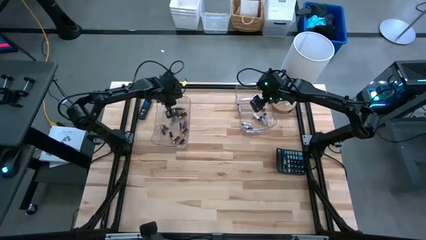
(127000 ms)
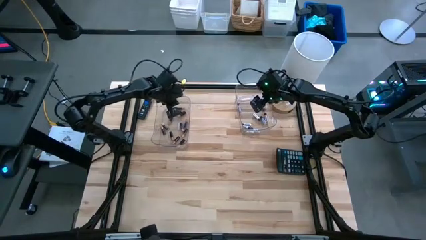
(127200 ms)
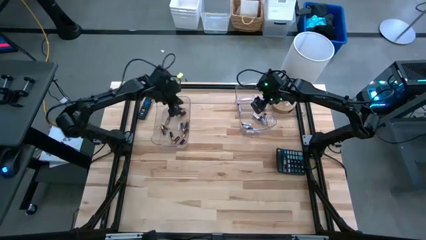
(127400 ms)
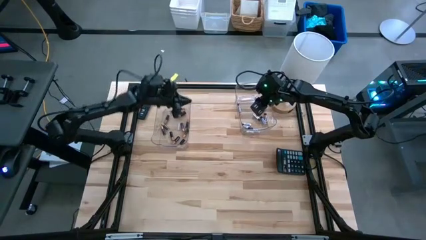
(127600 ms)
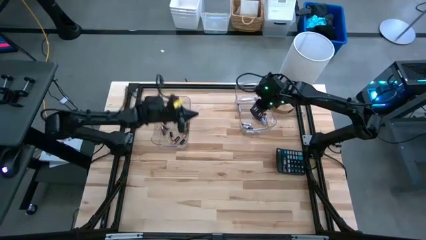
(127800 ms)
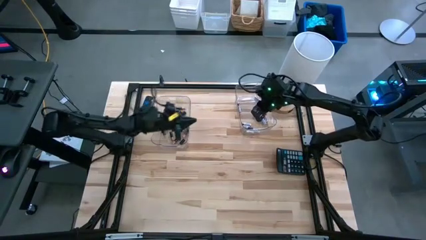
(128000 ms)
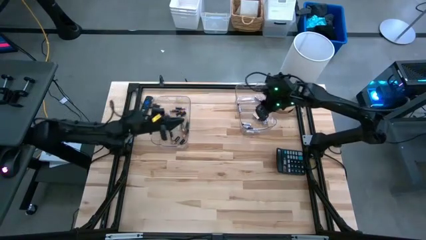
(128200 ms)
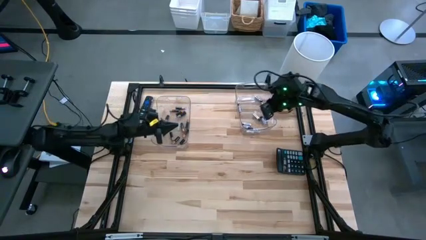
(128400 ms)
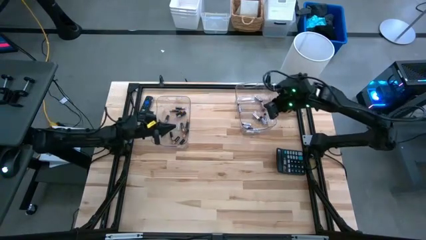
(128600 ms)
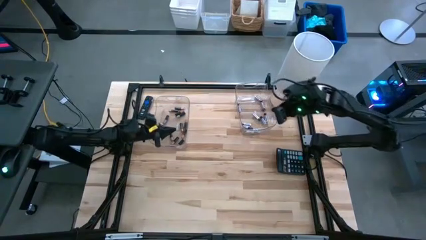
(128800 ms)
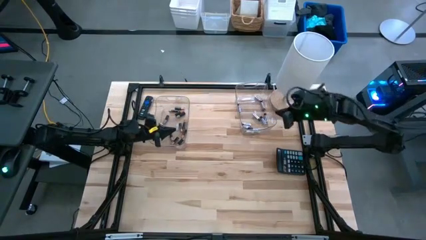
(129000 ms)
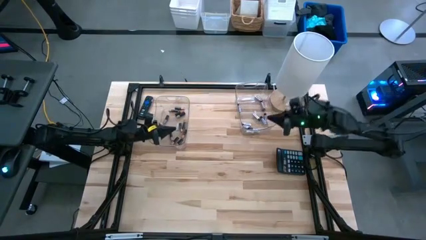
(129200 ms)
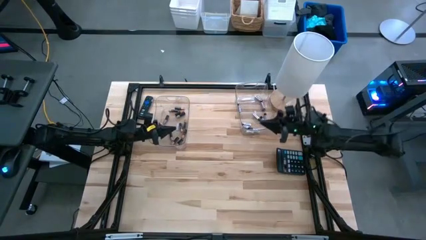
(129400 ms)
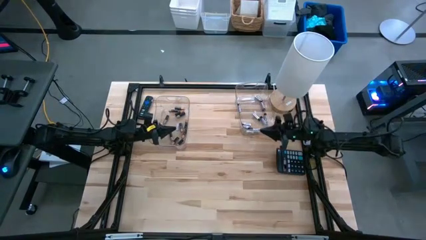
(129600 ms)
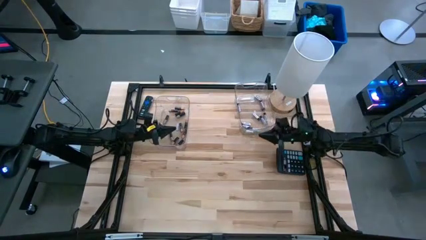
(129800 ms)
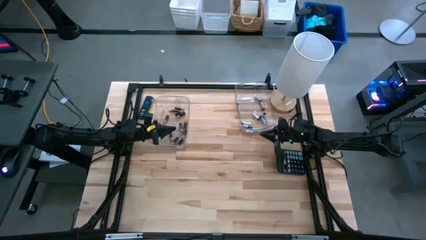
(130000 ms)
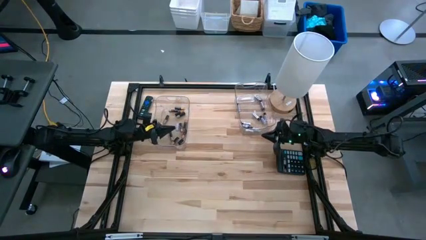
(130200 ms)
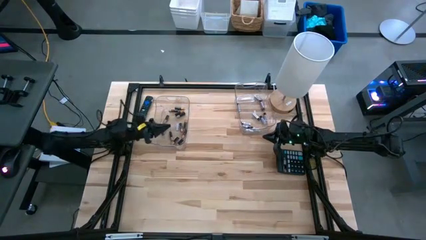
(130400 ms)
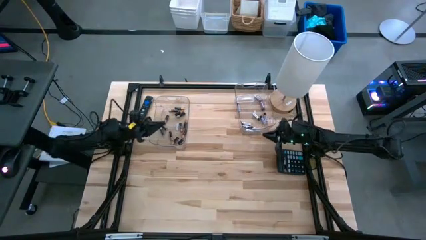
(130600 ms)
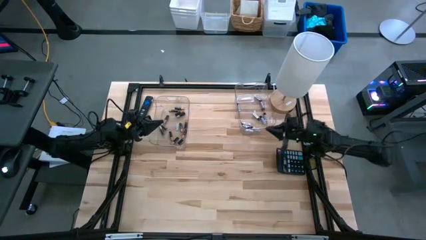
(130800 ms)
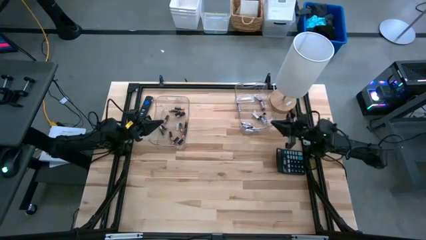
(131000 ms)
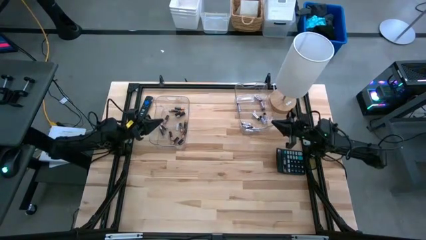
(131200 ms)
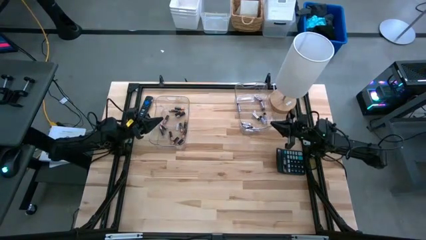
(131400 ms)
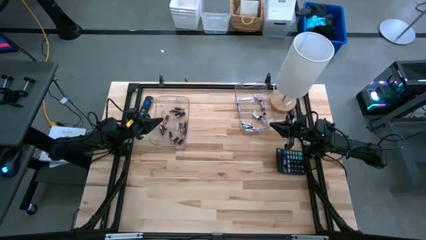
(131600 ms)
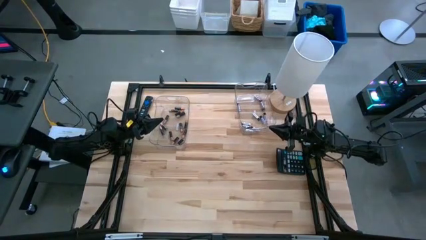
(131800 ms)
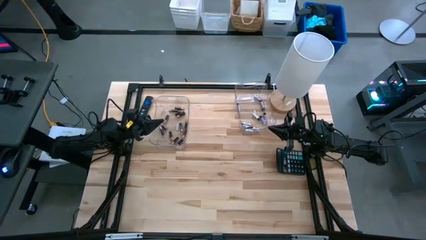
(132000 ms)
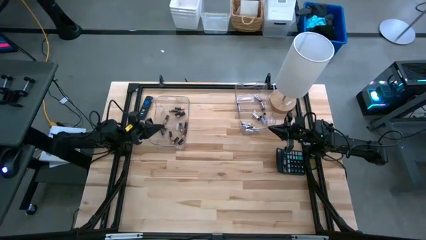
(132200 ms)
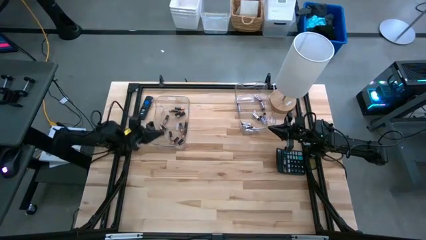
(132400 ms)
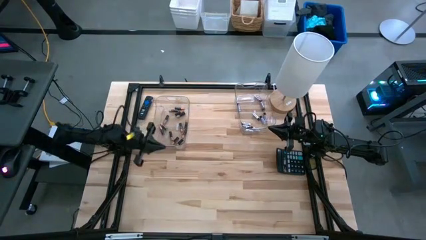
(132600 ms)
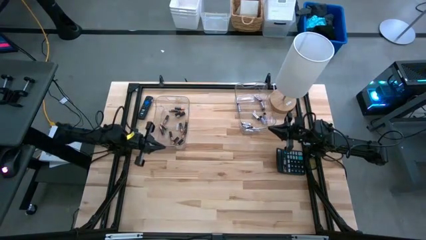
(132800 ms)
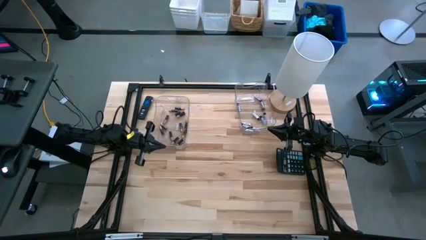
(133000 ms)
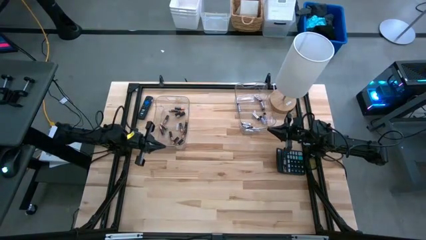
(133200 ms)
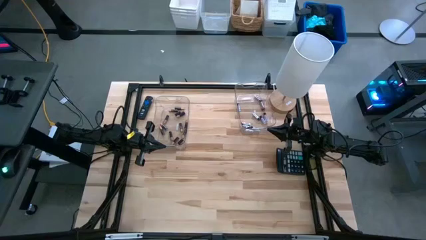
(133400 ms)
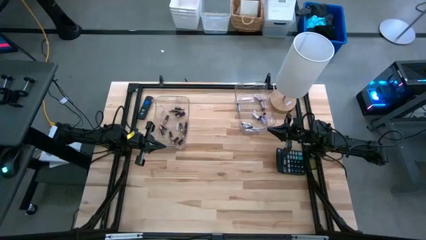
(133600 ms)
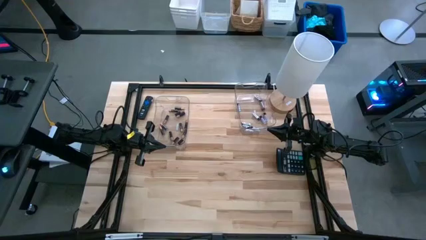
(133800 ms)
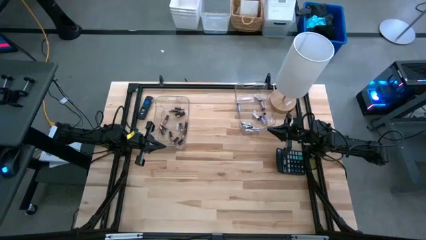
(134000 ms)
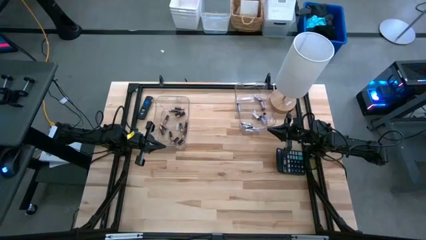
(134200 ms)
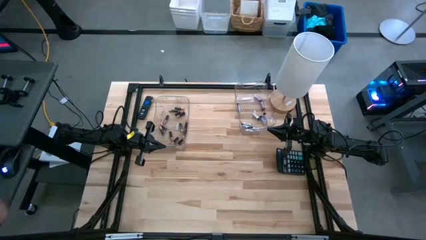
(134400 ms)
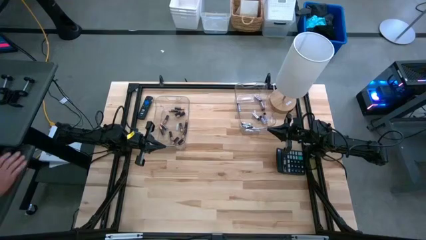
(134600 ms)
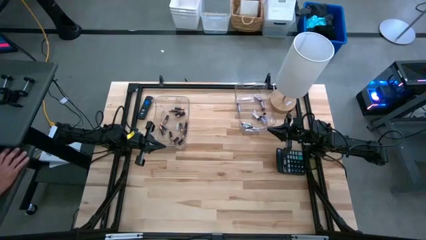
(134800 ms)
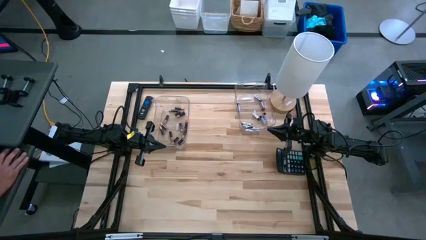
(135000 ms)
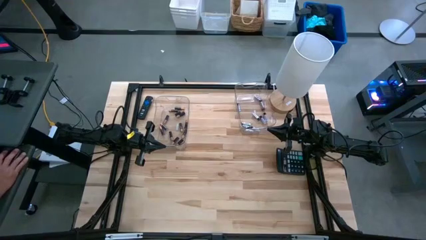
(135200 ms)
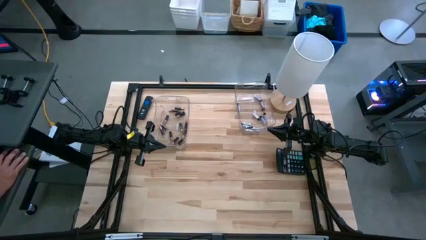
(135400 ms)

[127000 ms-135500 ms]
Task: Sort batteries
Return to Home Position

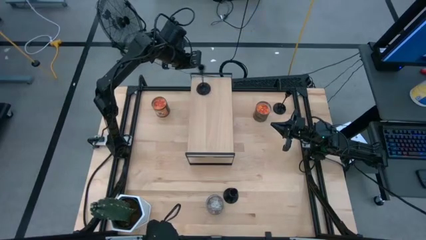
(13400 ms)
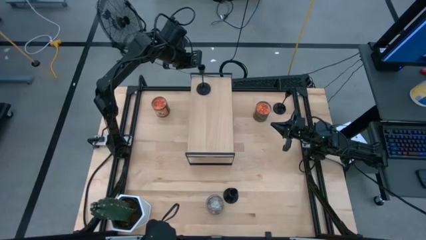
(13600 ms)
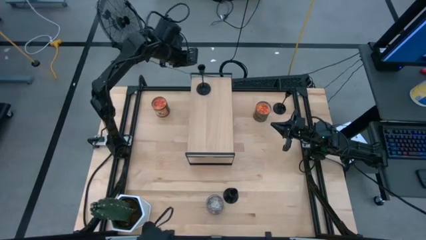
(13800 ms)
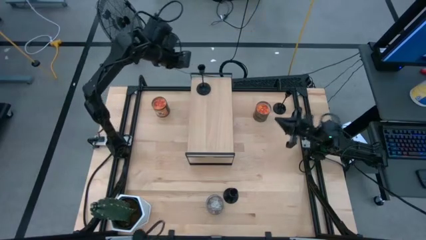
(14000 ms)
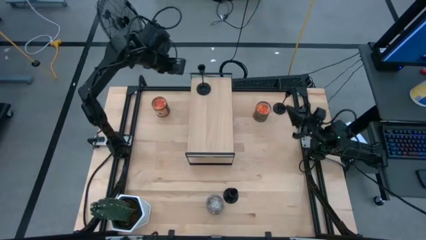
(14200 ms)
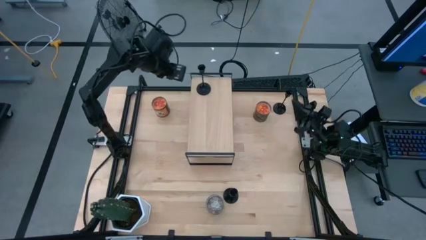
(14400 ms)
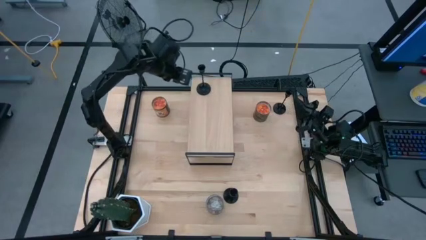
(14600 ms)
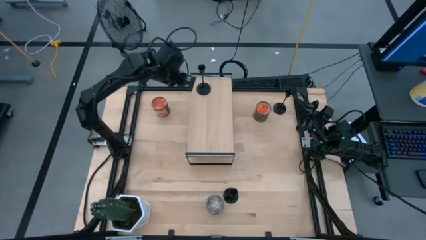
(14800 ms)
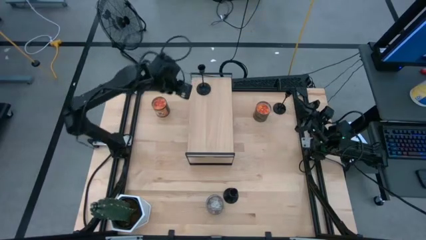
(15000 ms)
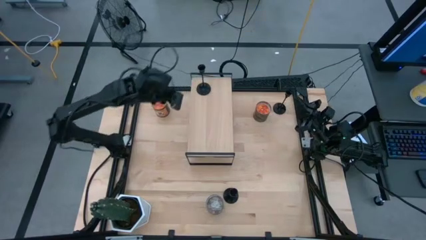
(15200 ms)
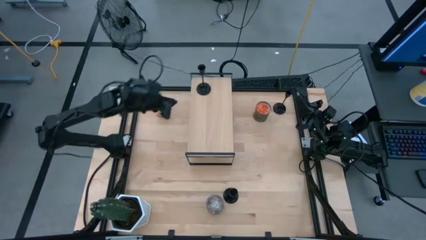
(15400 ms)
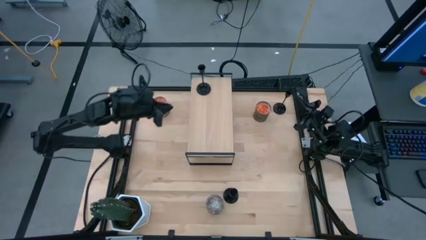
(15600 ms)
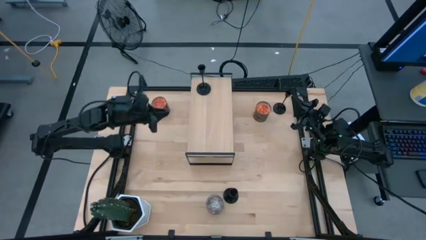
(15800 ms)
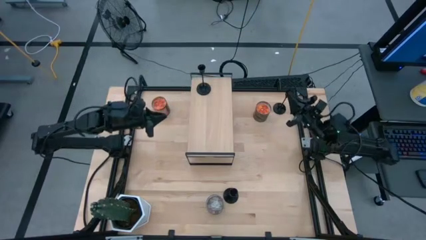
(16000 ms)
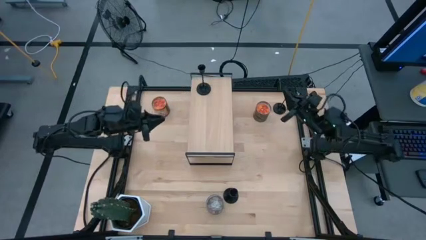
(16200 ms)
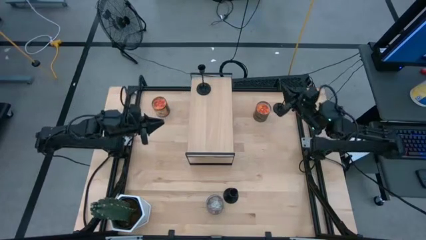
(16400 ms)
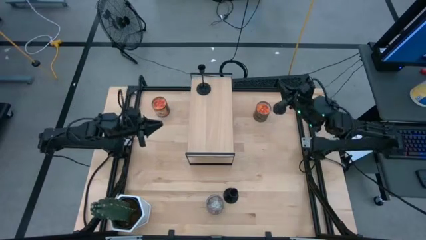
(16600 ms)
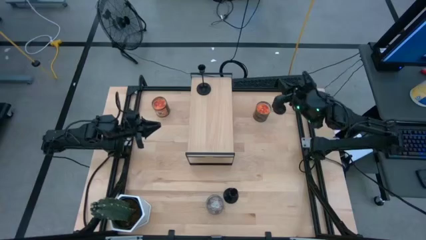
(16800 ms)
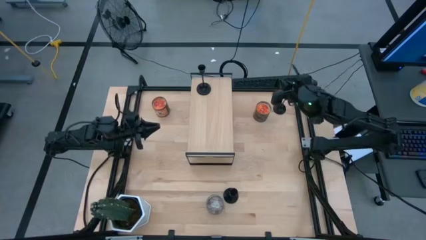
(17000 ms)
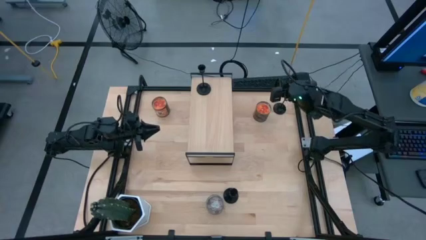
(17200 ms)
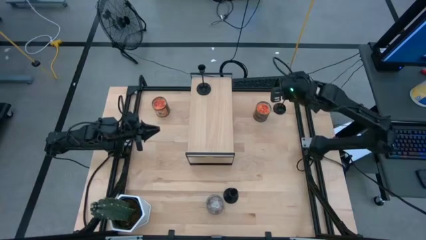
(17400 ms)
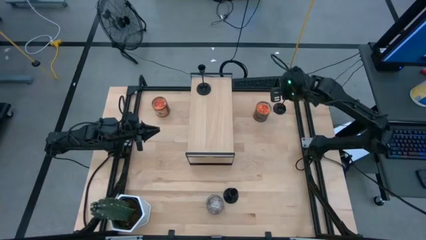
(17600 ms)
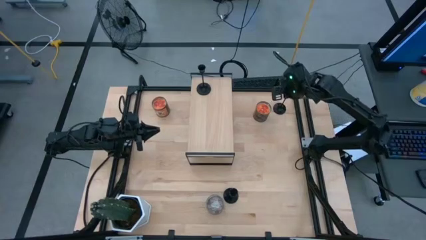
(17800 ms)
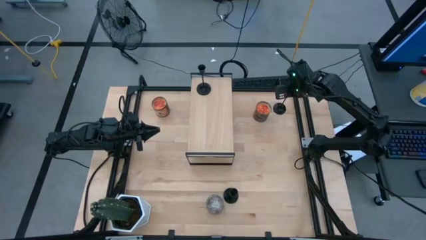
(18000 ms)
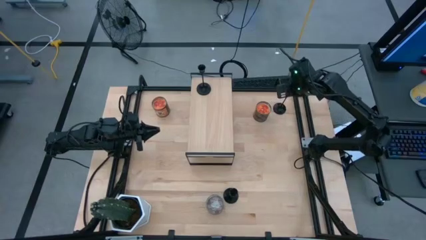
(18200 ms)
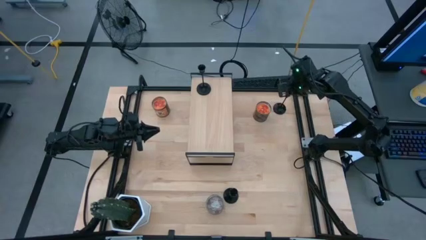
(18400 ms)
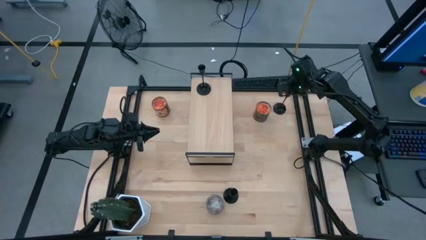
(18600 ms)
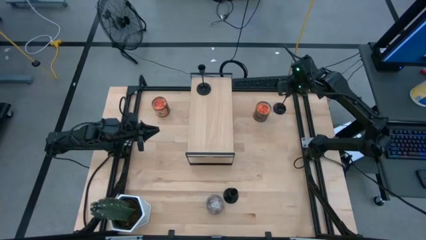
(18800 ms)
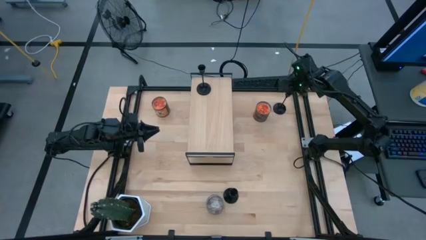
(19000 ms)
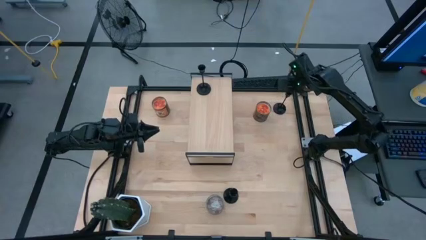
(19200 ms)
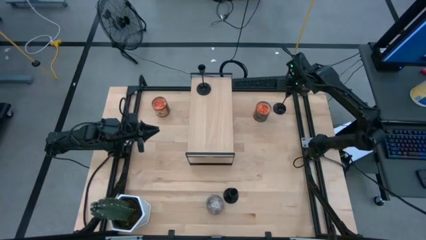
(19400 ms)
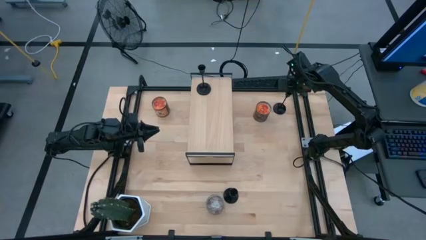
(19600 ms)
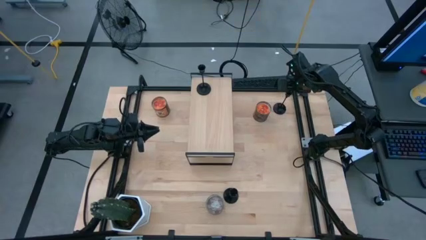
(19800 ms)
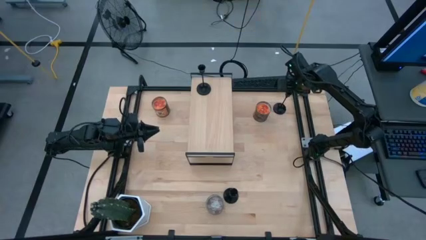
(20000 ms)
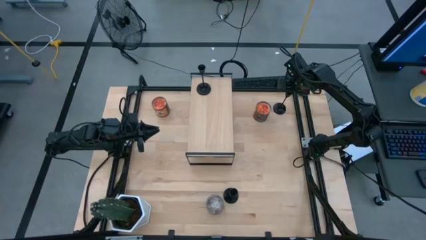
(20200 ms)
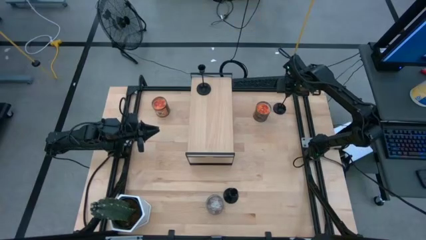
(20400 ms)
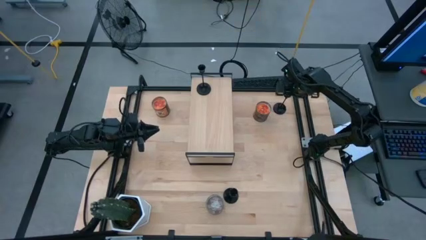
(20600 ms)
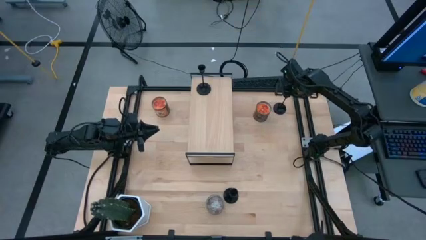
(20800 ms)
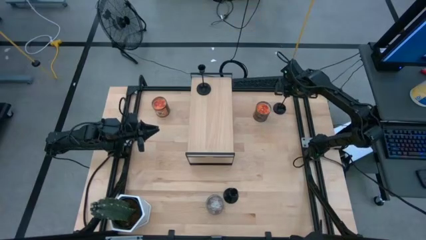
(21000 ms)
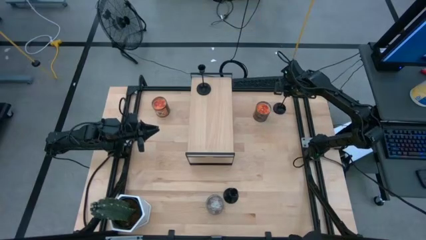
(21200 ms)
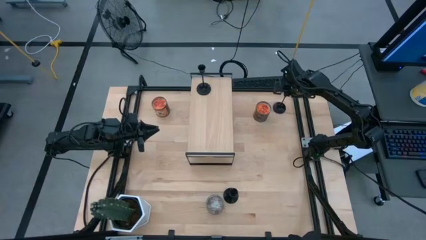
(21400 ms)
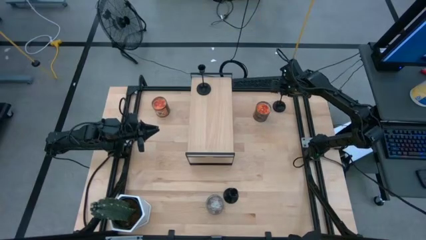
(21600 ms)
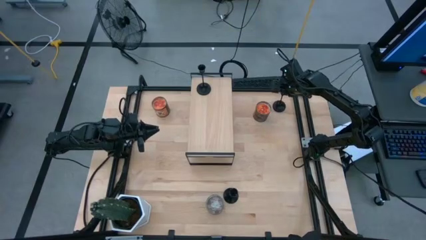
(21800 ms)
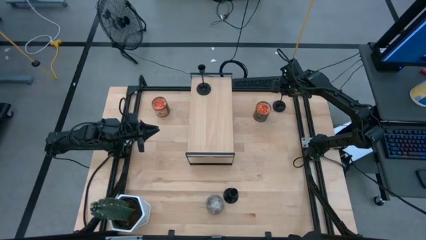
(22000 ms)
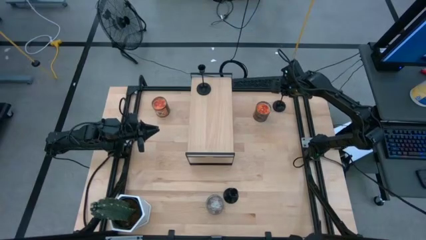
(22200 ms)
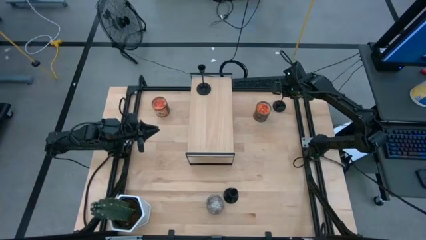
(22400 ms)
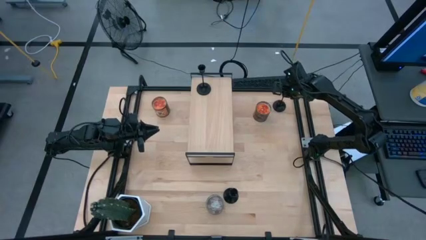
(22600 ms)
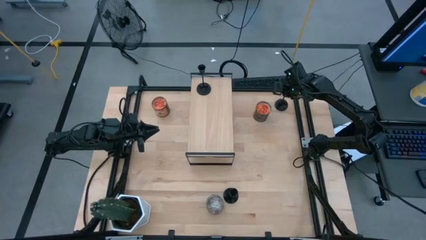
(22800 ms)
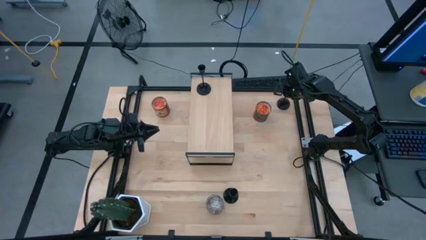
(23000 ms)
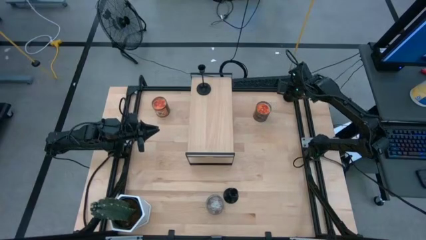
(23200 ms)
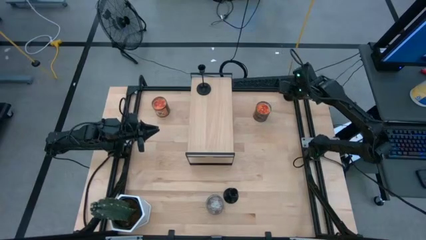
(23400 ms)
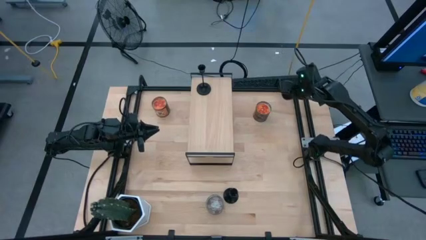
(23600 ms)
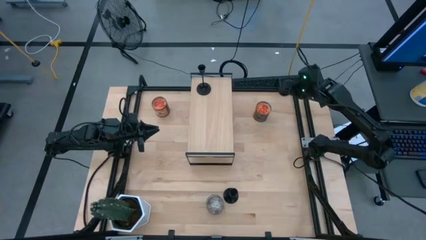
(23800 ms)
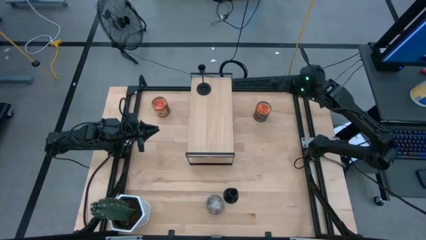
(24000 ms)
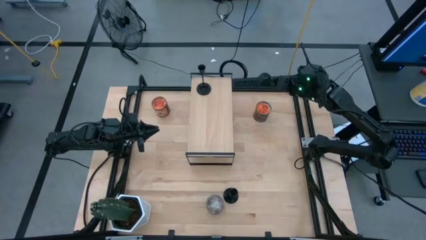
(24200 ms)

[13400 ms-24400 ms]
Task: Pick & Place candle stick holders
Put the top black candle holder on the shelf aligned with the other black candle holder
